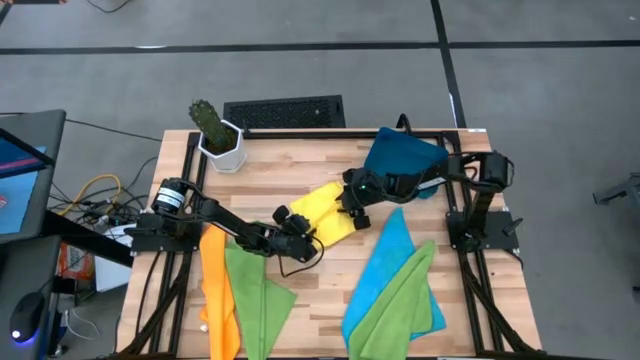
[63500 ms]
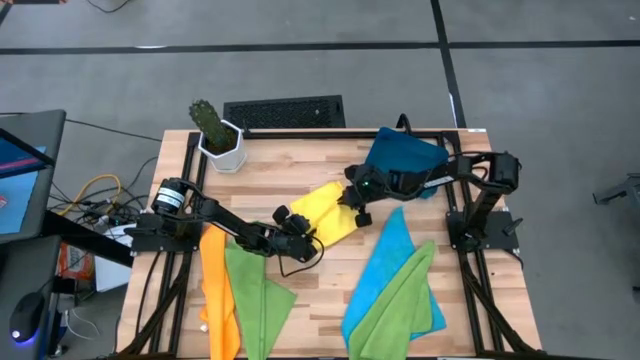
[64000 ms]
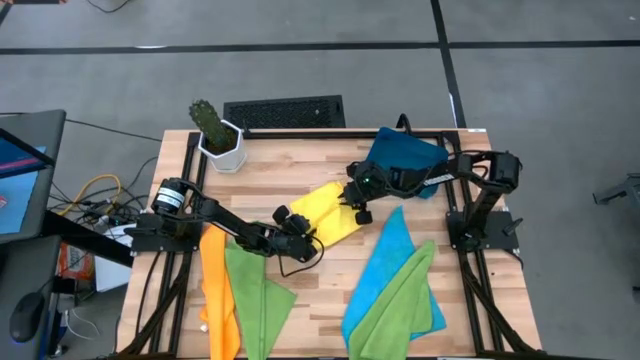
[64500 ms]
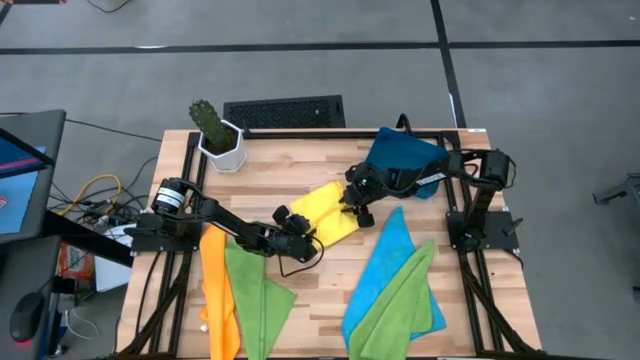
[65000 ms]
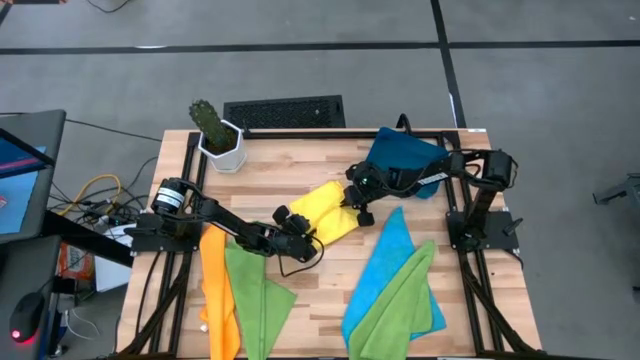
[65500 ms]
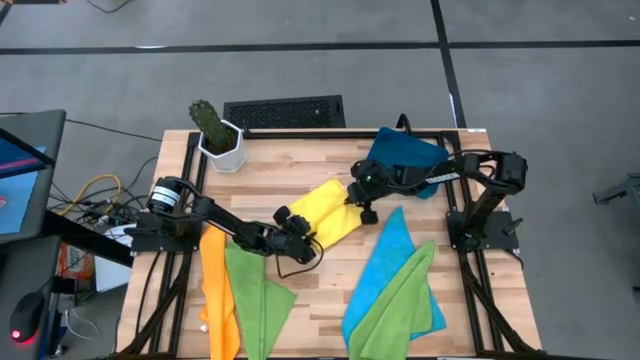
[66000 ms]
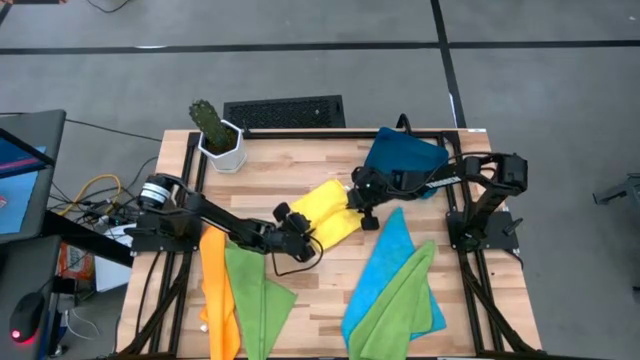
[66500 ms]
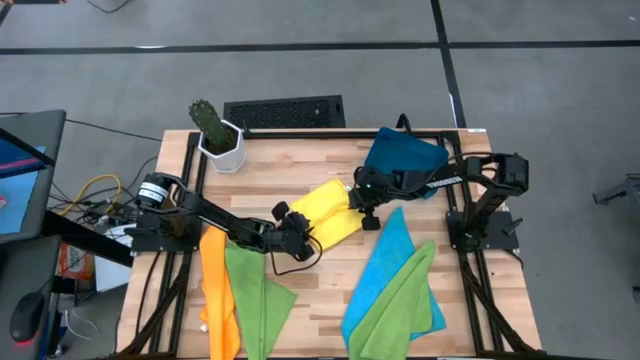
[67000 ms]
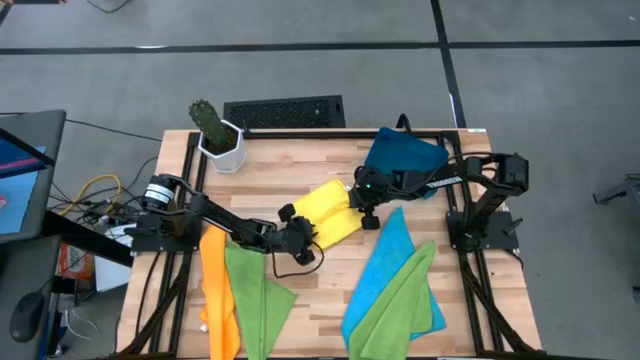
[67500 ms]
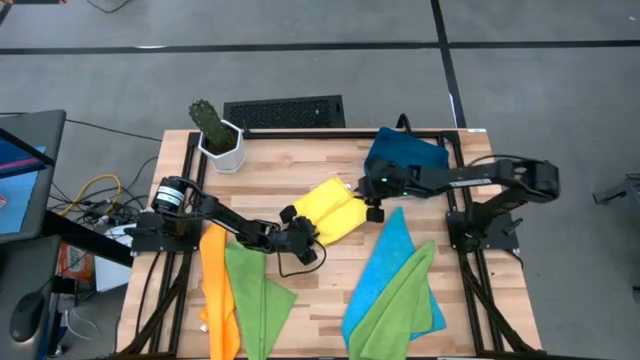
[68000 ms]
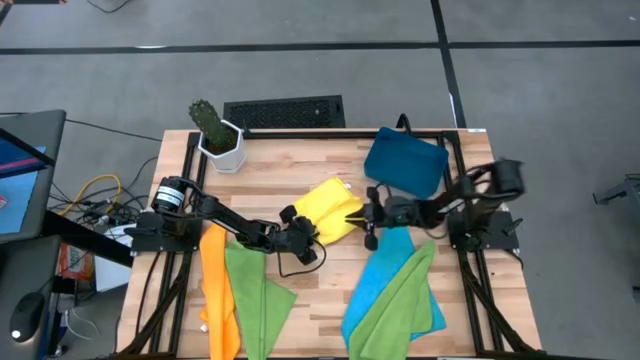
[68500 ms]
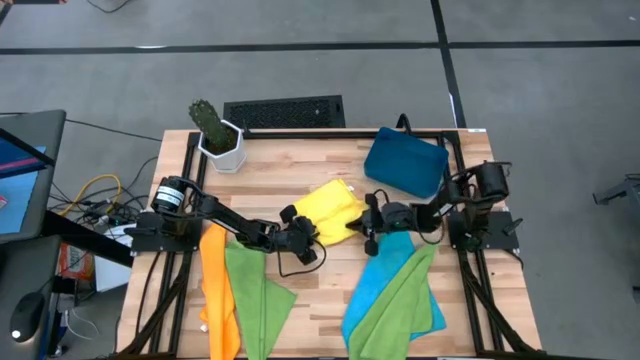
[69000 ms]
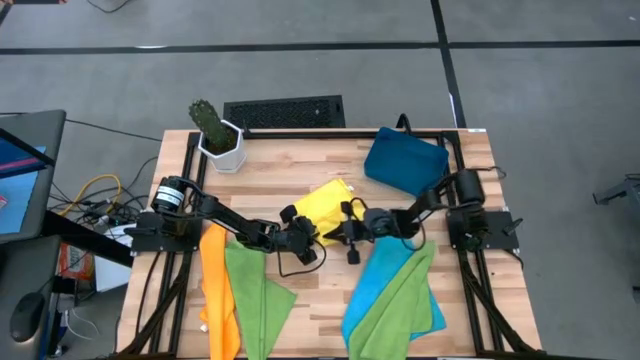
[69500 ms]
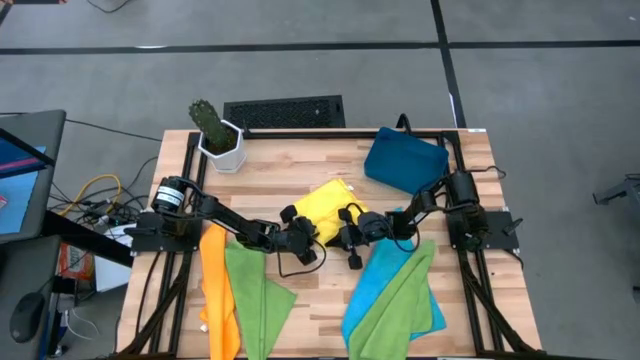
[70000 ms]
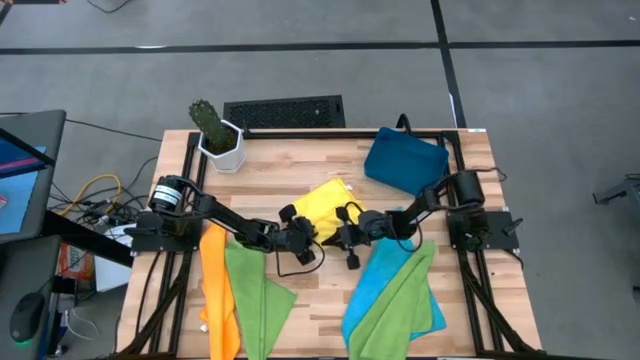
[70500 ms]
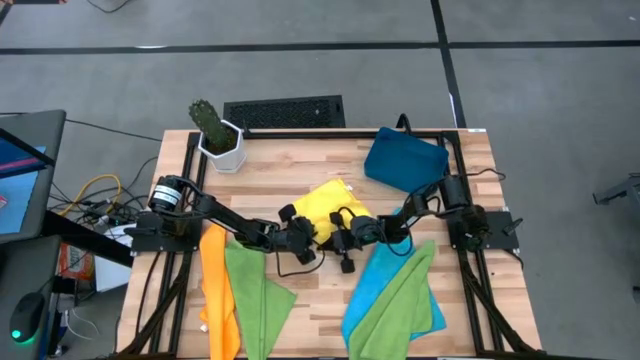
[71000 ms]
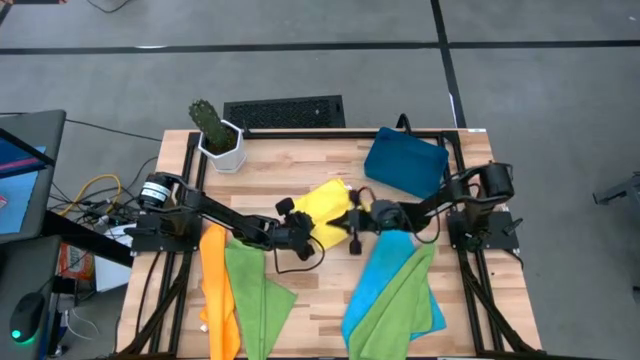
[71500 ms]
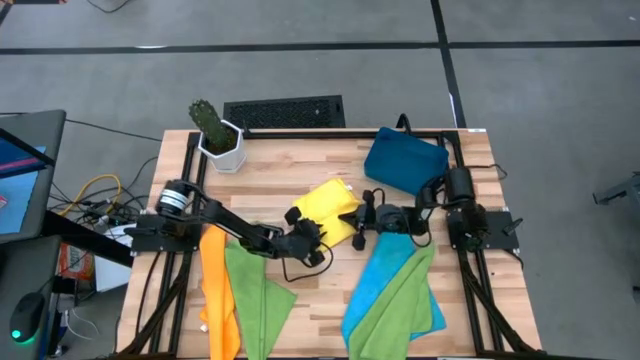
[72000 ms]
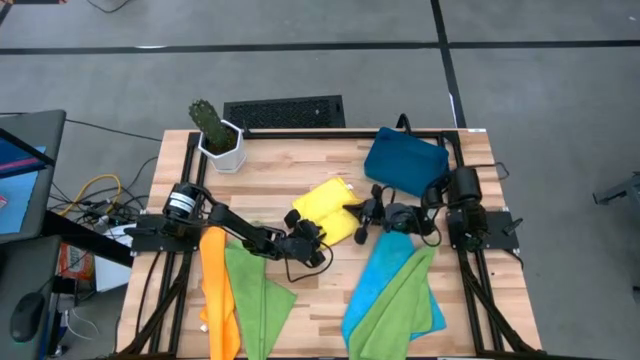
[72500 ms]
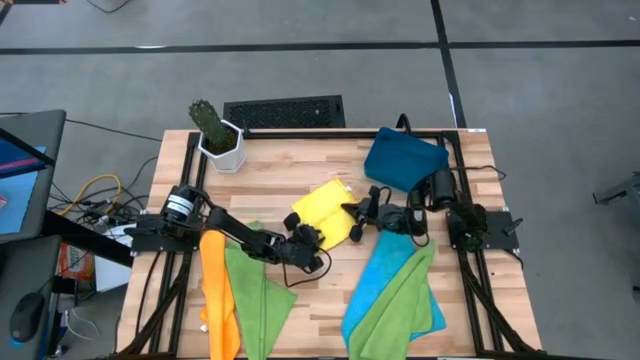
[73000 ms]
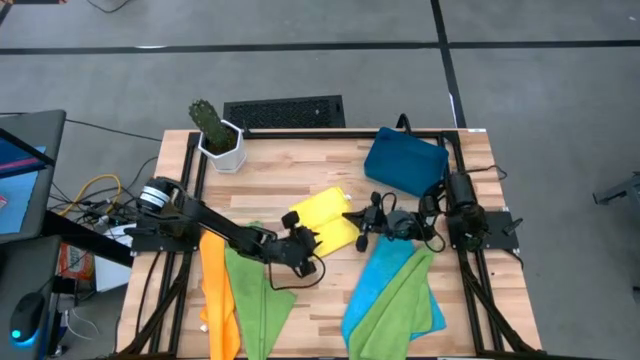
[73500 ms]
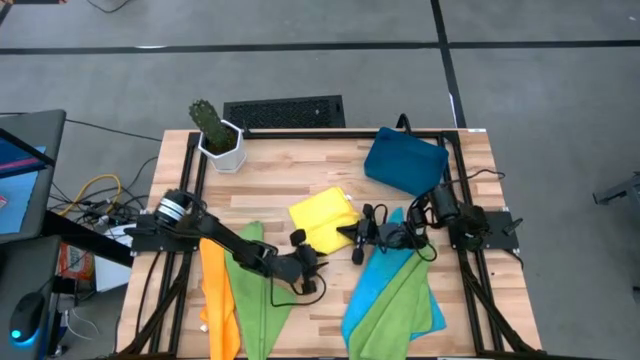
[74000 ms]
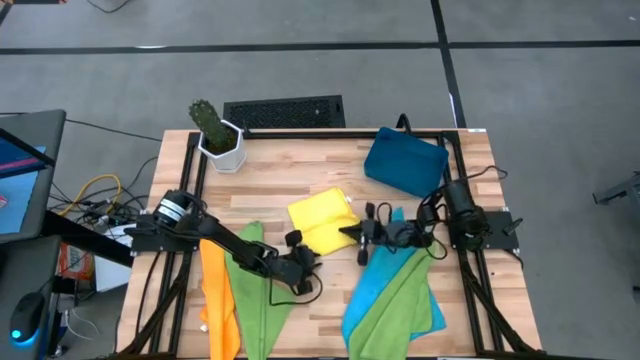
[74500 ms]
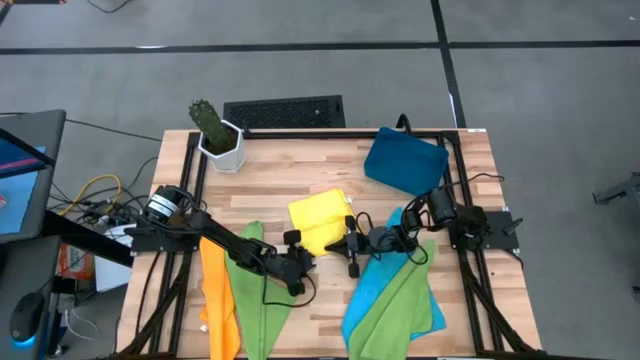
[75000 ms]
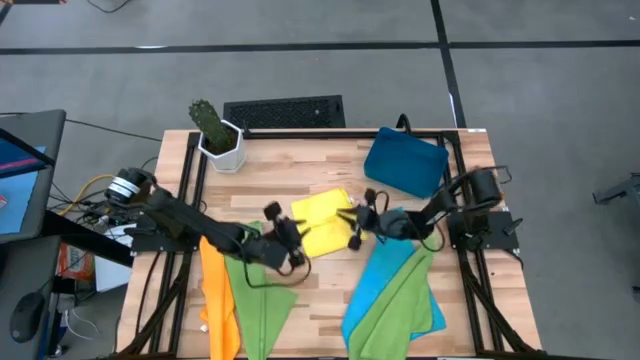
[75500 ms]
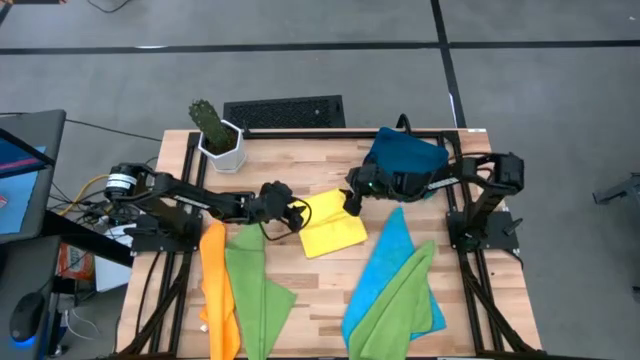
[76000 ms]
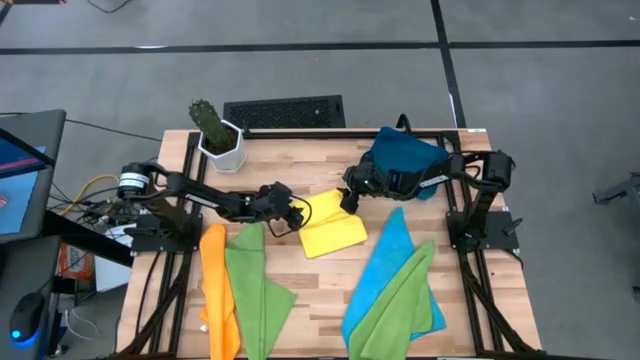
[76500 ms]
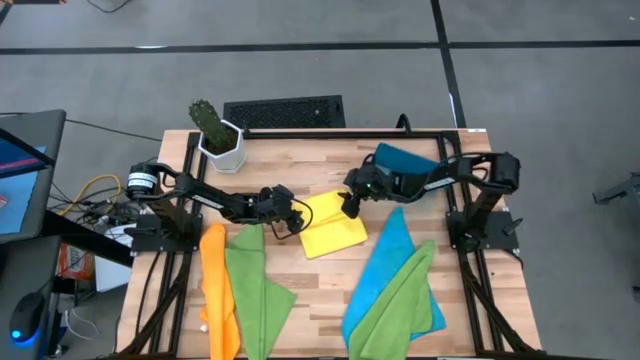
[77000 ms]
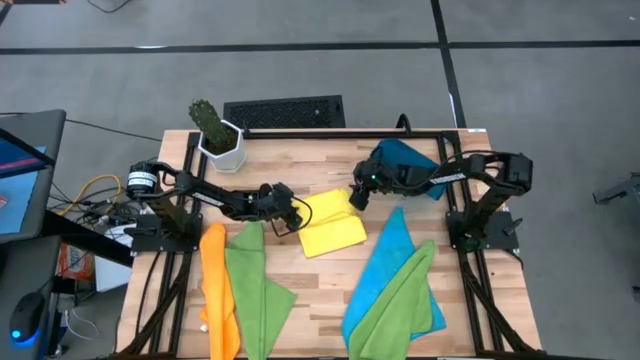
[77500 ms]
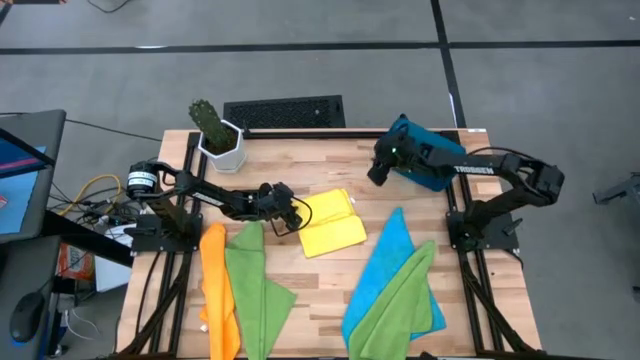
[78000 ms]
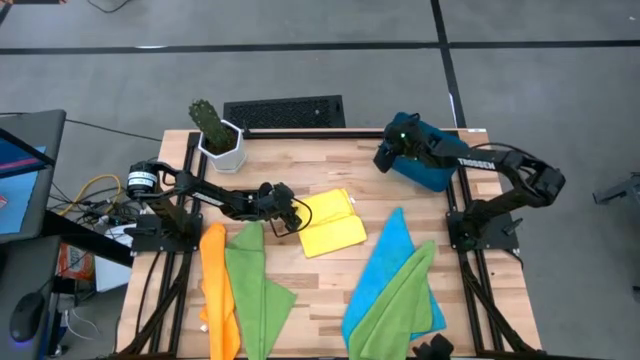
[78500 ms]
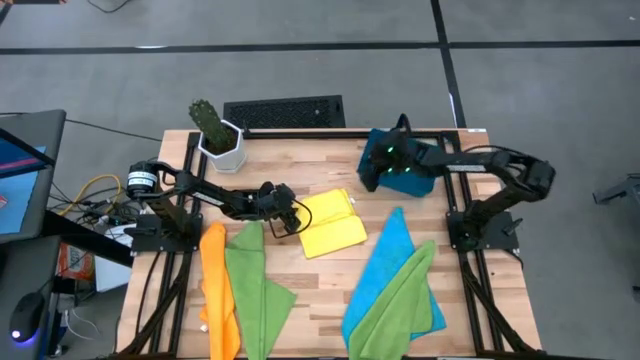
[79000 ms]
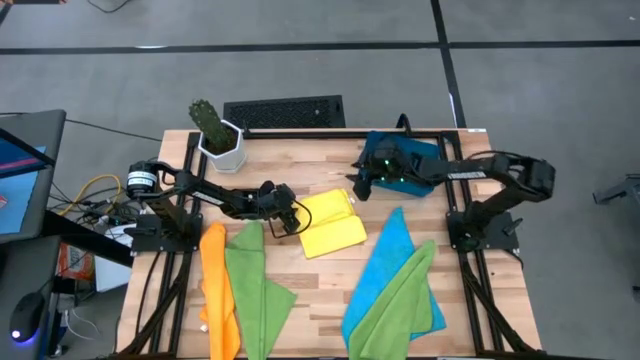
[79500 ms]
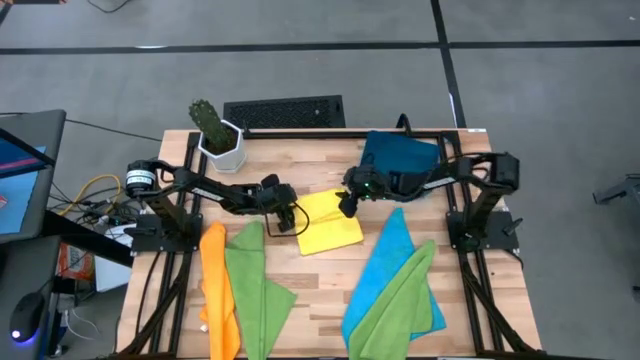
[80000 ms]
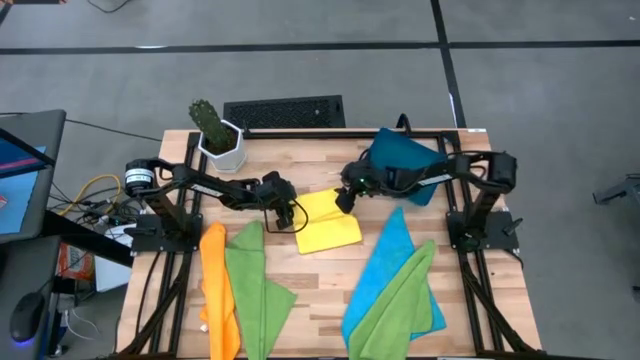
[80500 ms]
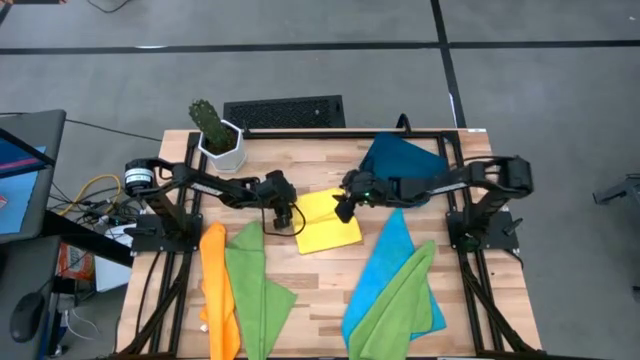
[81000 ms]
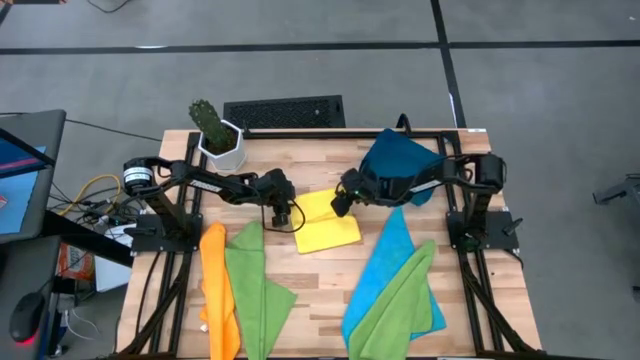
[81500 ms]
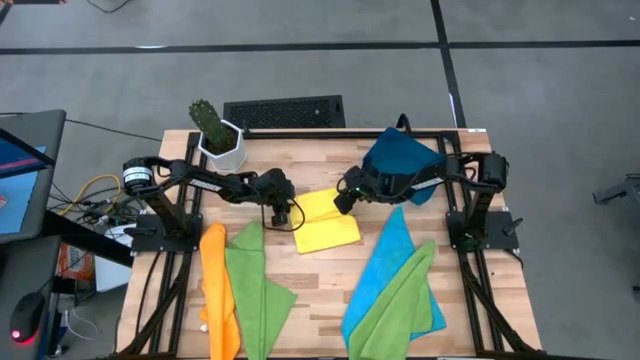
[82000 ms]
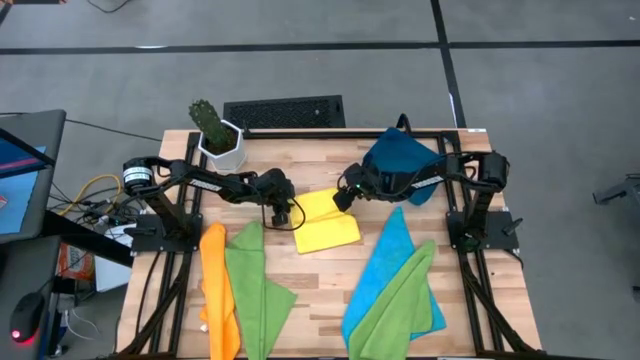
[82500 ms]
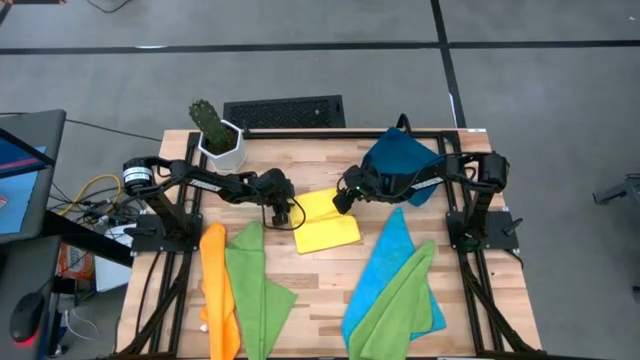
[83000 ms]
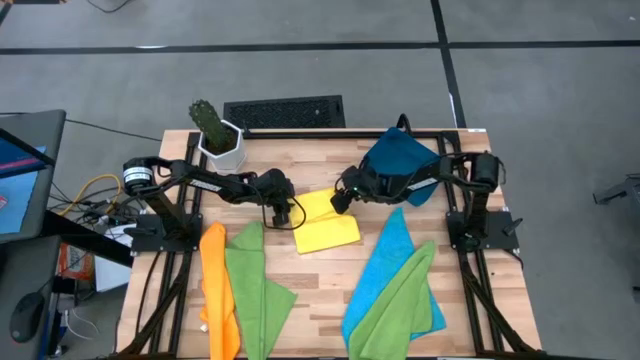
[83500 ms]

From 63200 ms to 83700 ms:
Task: Fold microfiber towels
Fold the yellow microfiber cloth
